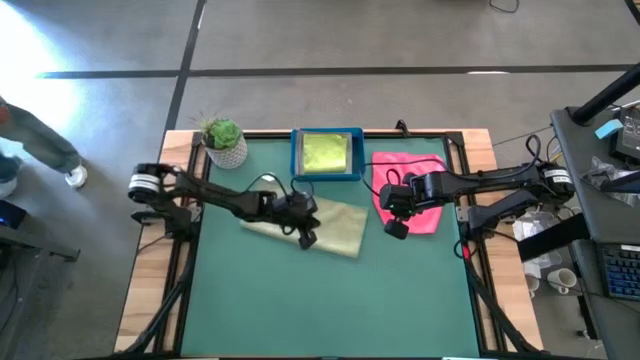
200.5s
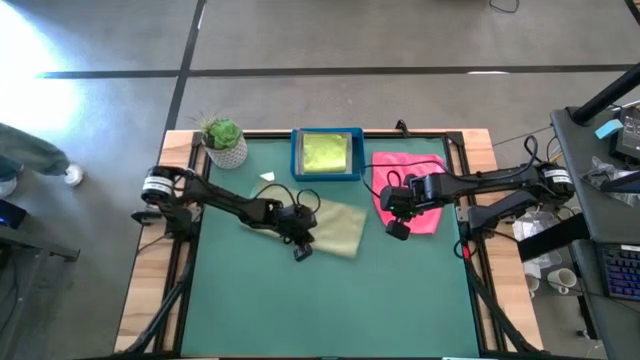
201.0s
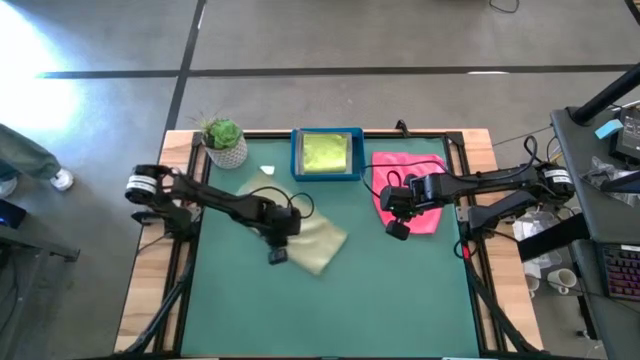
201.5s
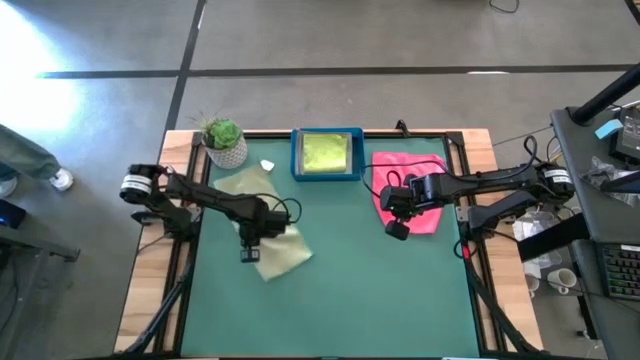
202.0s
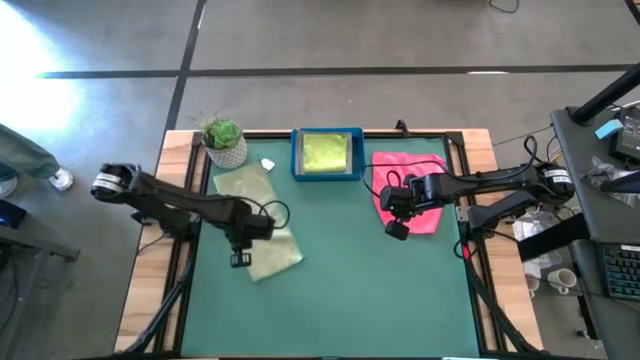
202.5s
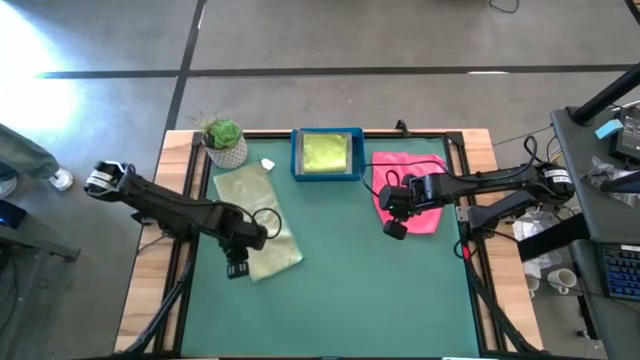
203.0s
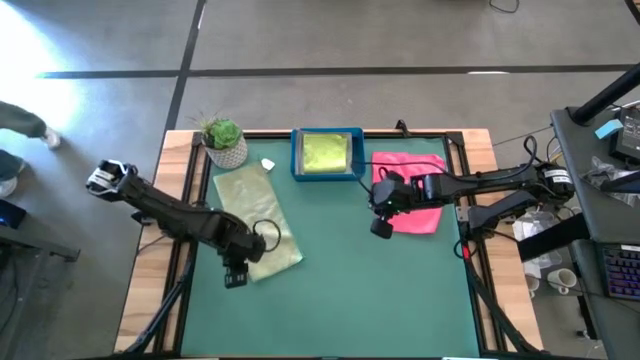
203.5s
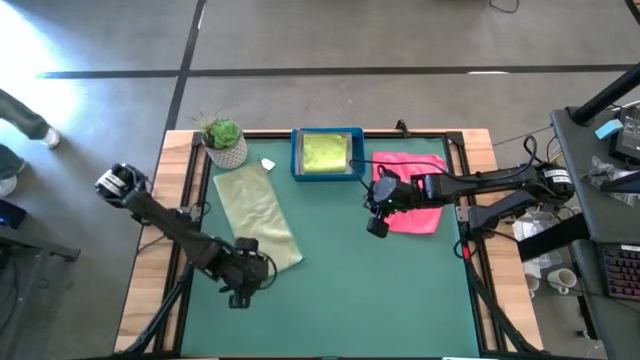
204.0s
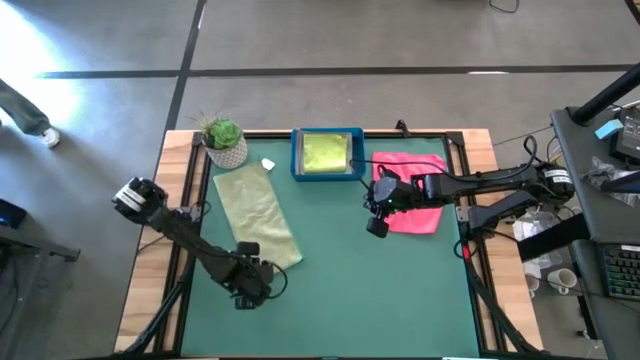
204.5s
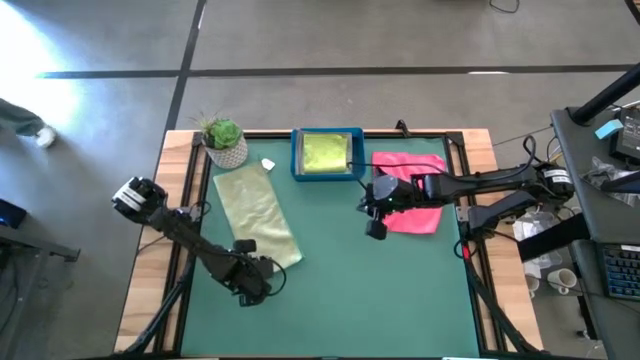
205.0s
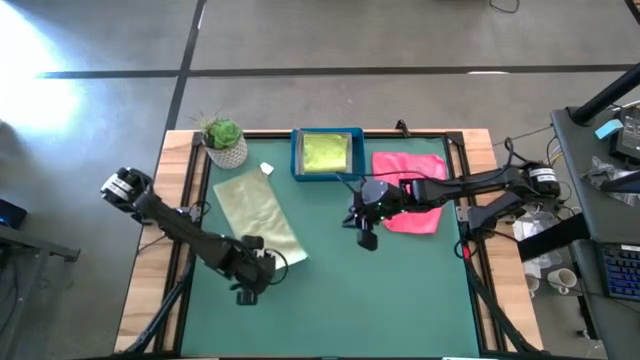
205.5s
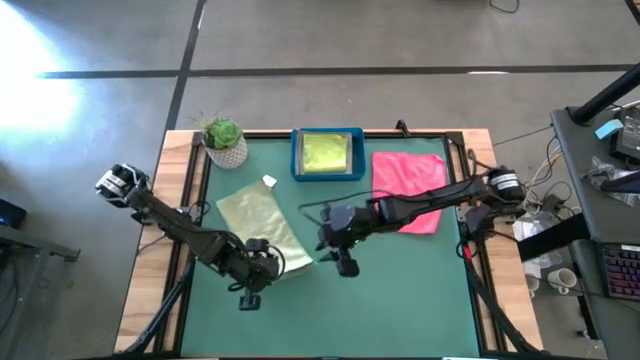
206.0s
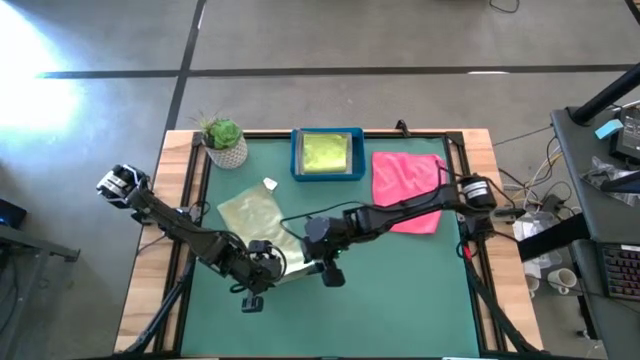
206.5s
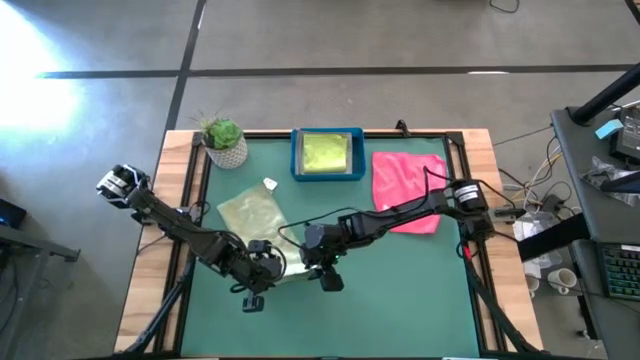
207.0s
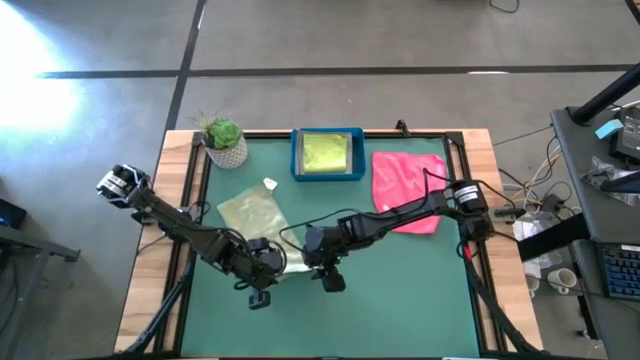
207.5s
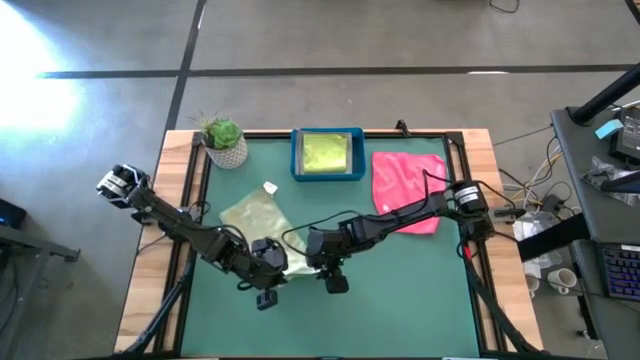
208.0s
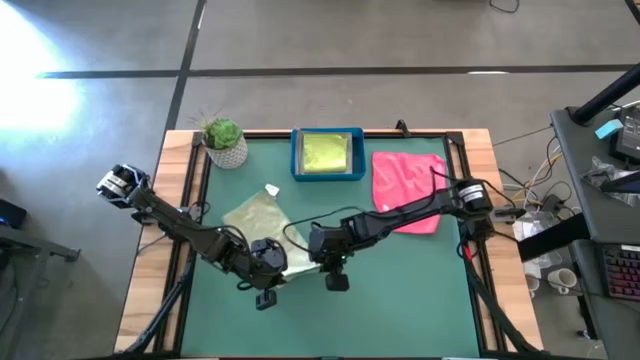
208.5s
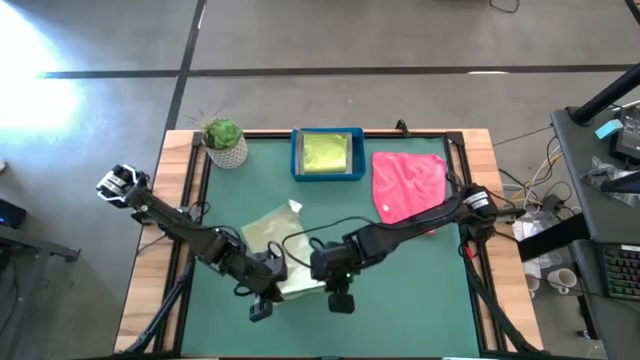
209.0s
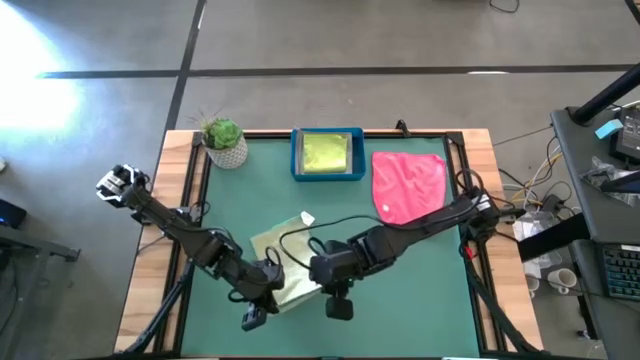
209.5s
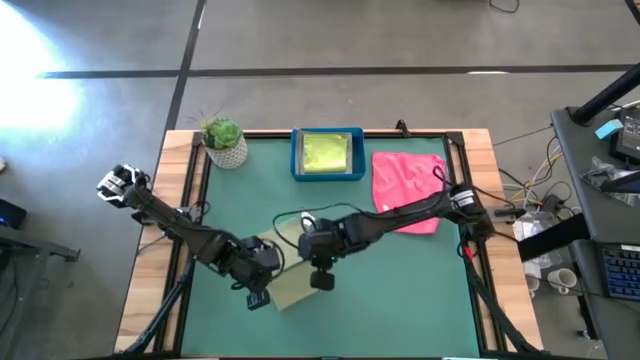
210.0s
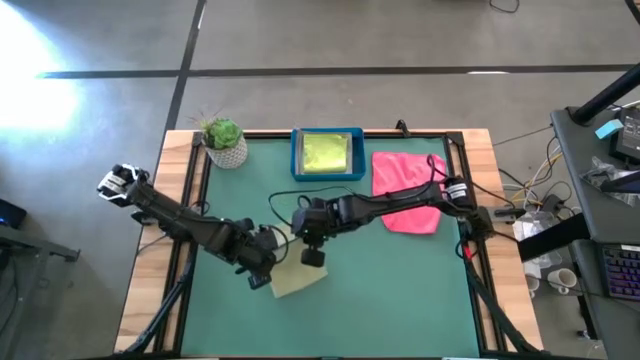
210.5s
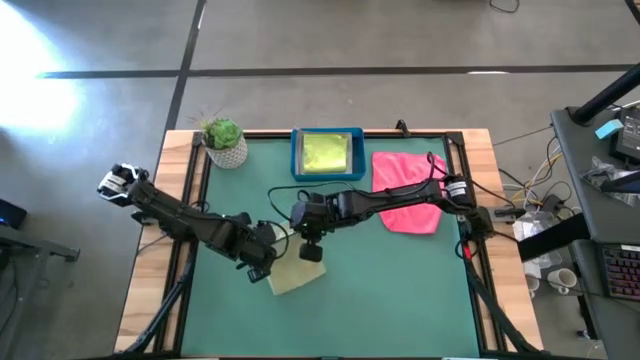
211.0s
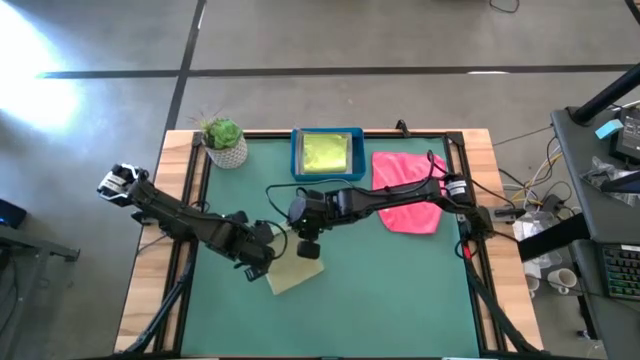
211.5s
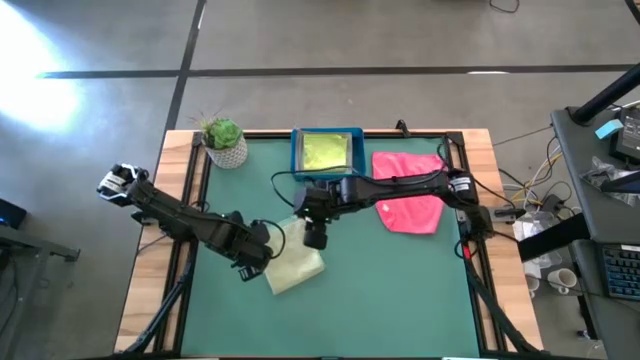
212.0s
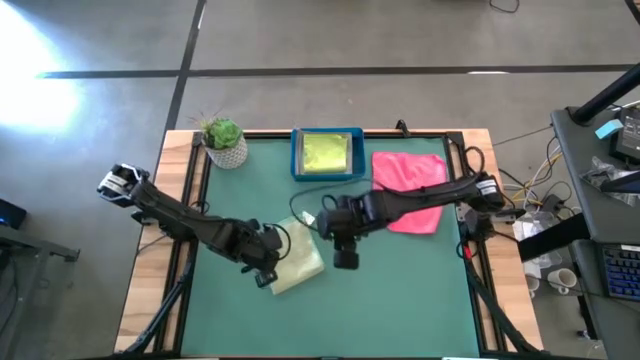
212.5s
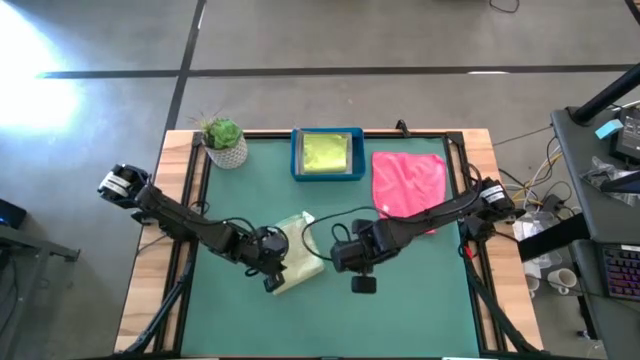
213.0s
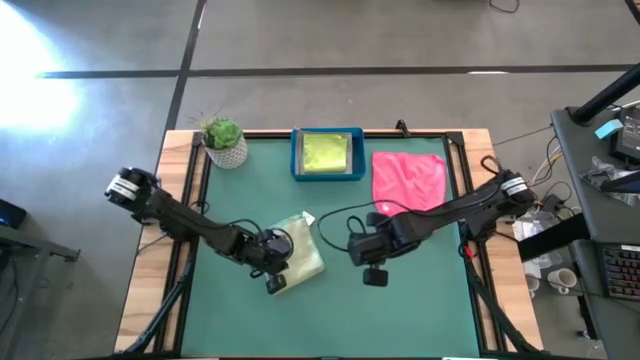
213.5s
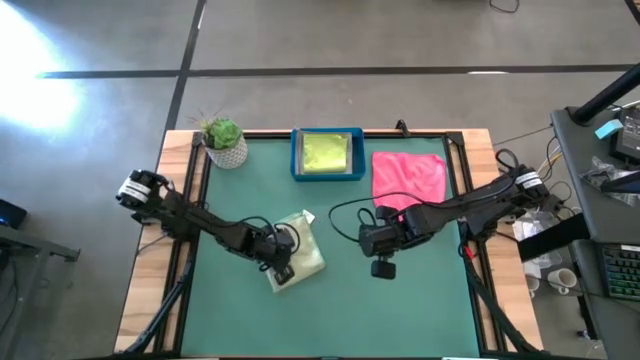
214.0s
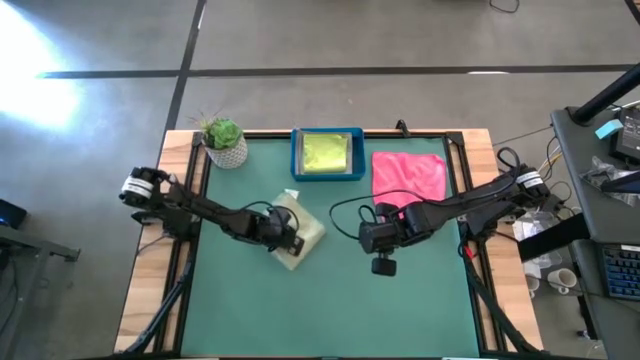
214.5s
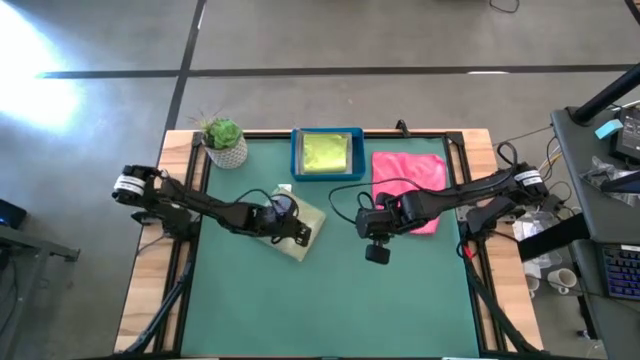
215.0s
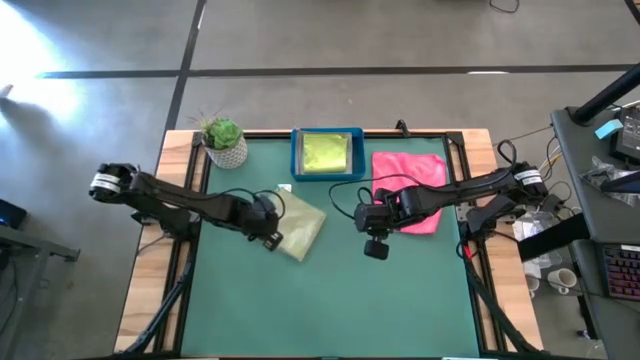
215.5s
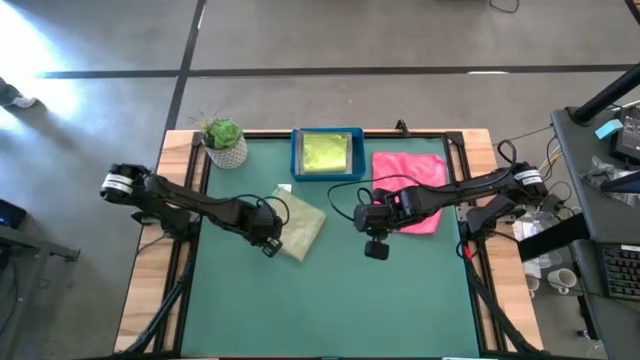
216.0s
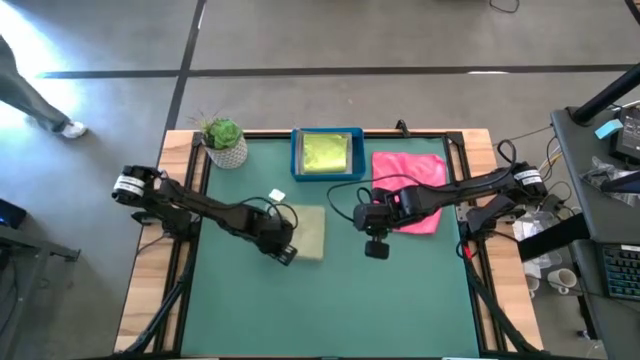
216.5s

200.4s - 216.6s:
Task: Fold microfiber towels
Fold the dark green microfiber cloth

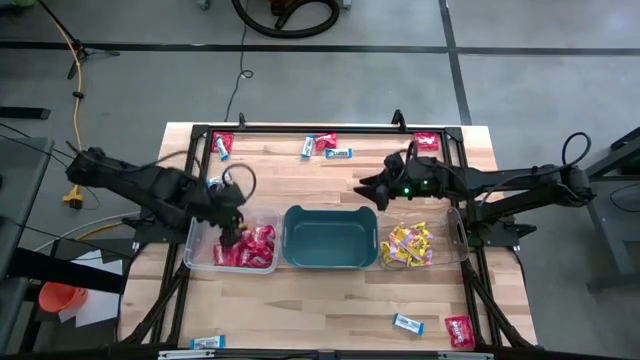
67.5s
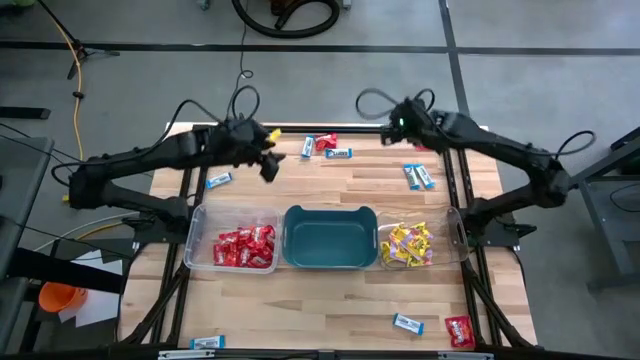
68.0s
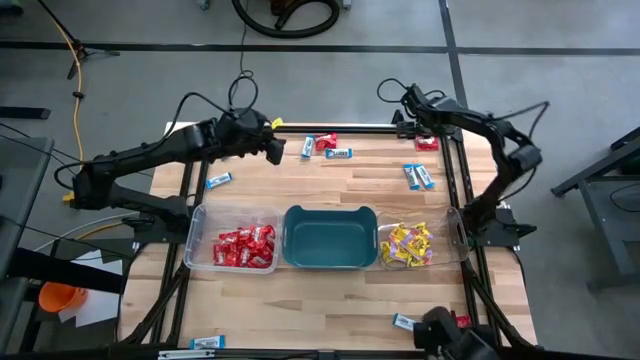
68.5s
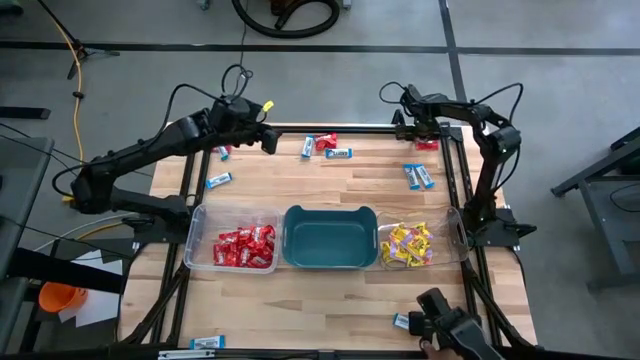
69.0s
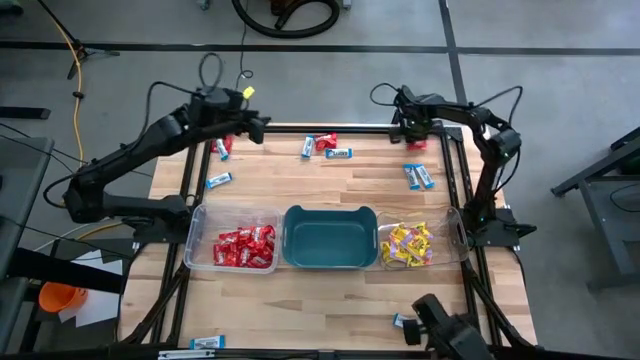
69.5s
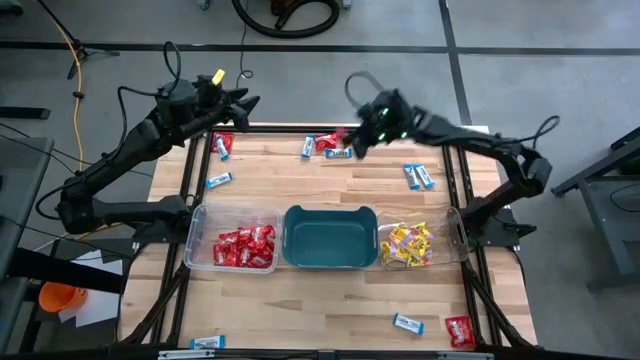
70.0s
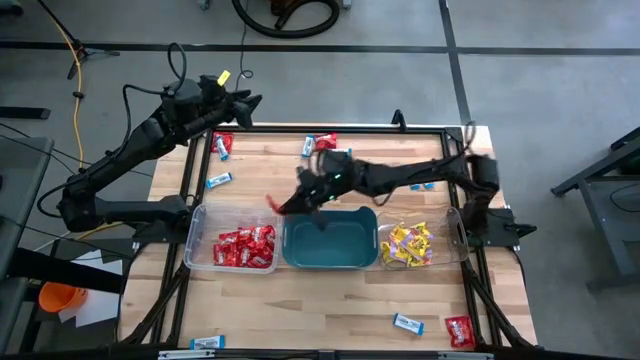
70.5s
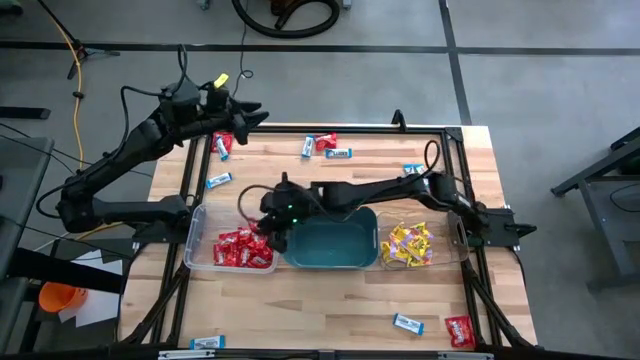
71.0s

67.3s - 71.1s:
Task: Sort candy
Put the red candy into the left transparent bin

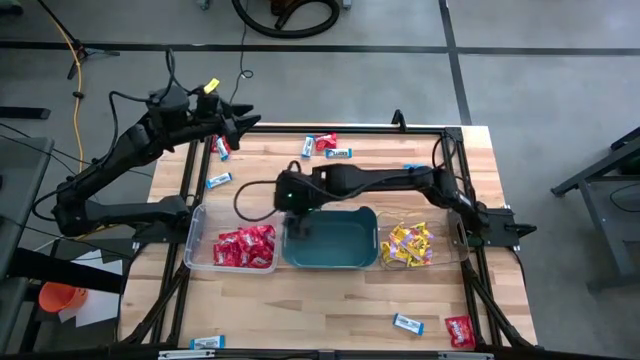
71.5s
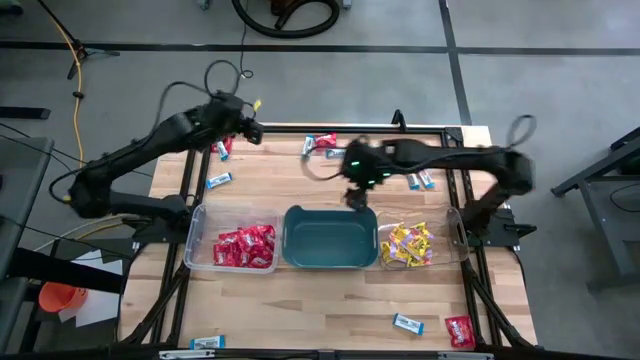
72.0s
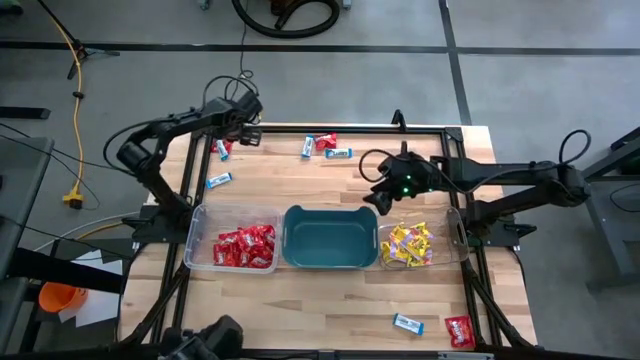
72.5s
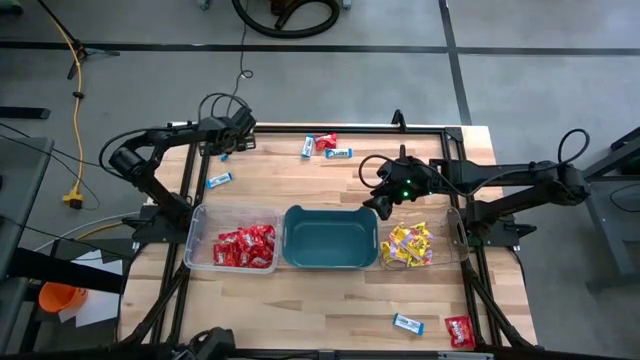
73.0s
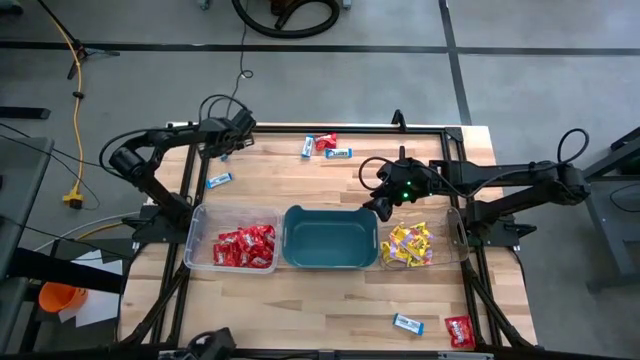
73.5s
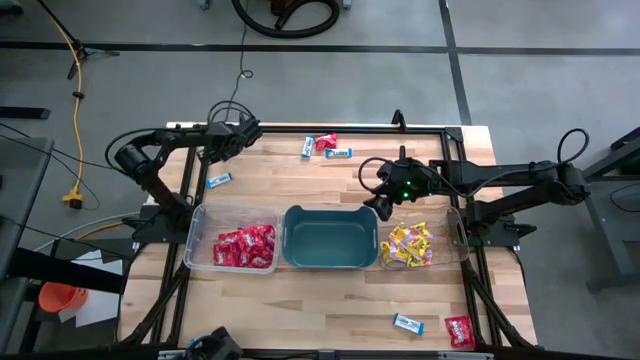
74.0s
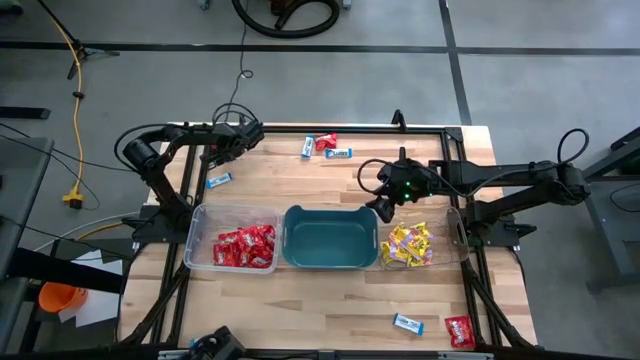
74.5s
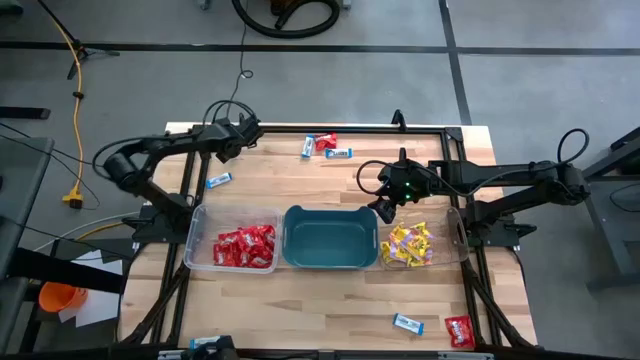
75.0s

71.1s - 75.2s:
Put the white chocolate into the blue bin
